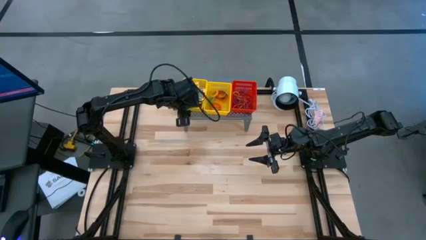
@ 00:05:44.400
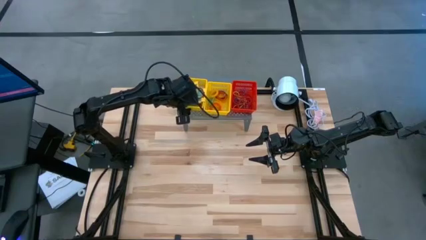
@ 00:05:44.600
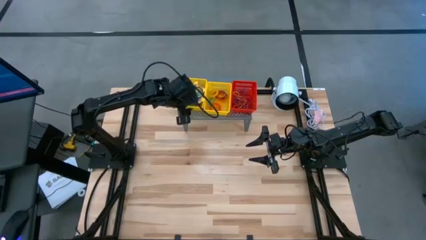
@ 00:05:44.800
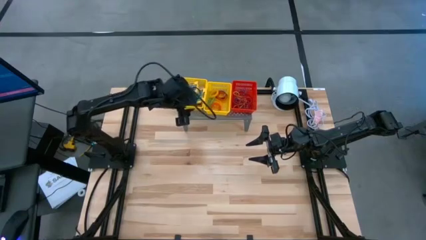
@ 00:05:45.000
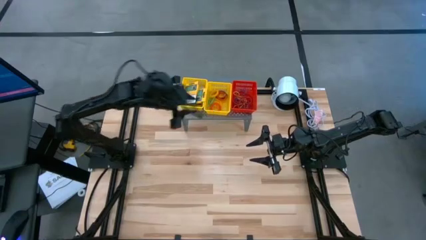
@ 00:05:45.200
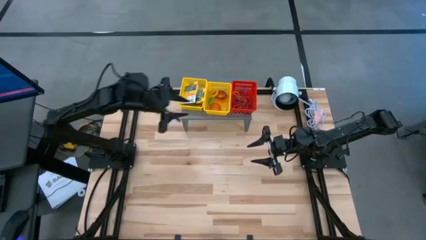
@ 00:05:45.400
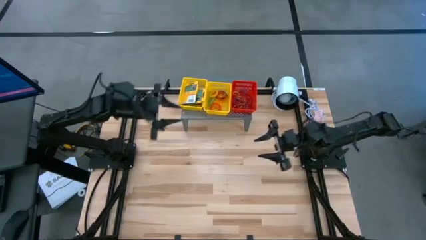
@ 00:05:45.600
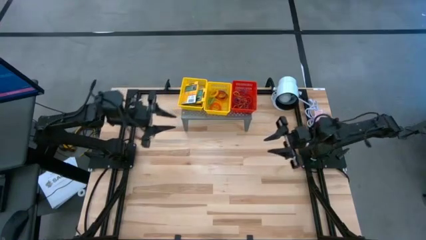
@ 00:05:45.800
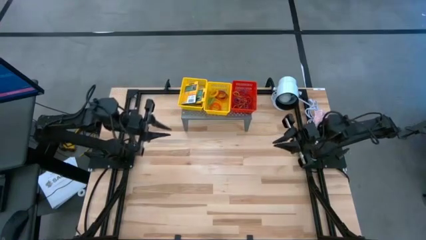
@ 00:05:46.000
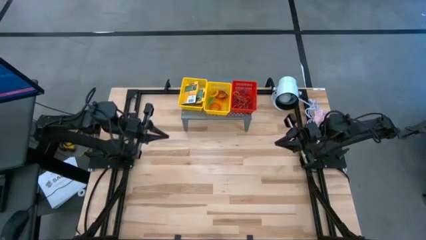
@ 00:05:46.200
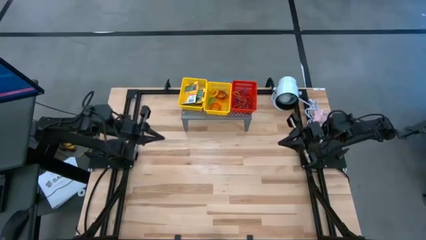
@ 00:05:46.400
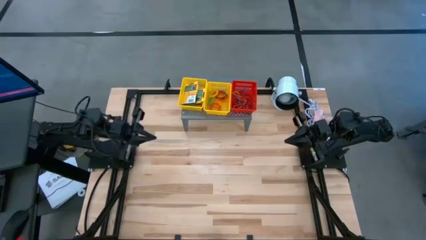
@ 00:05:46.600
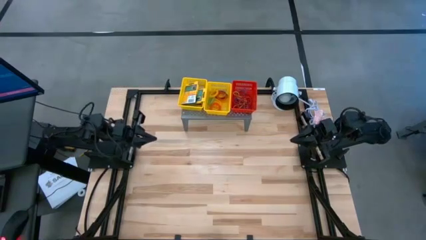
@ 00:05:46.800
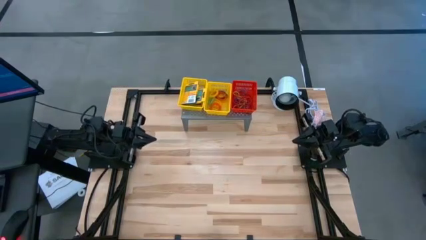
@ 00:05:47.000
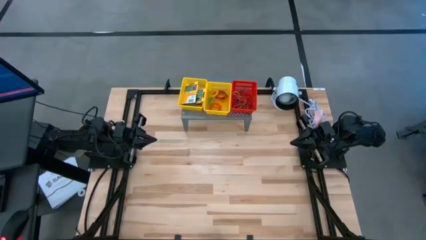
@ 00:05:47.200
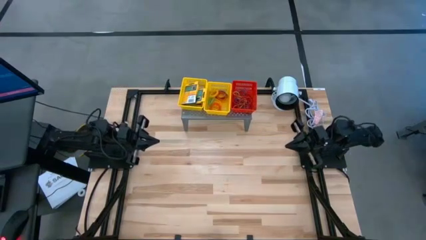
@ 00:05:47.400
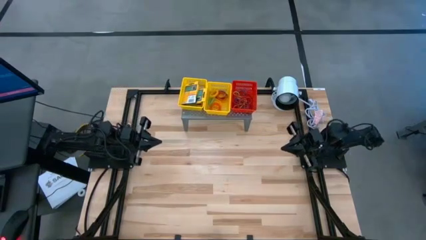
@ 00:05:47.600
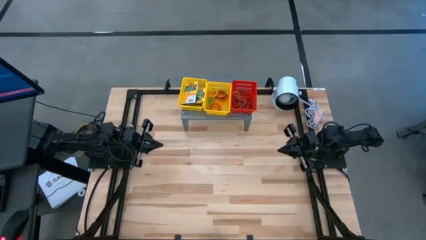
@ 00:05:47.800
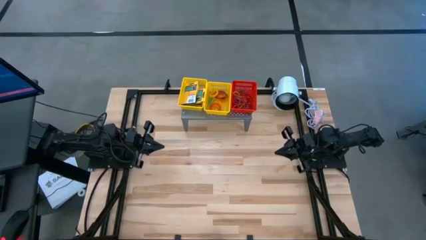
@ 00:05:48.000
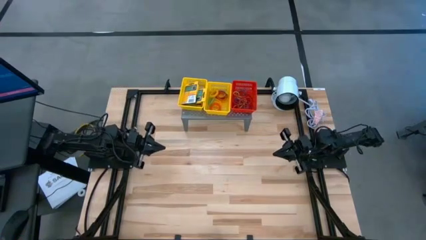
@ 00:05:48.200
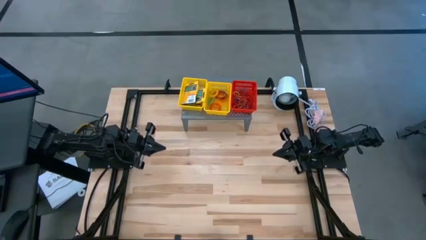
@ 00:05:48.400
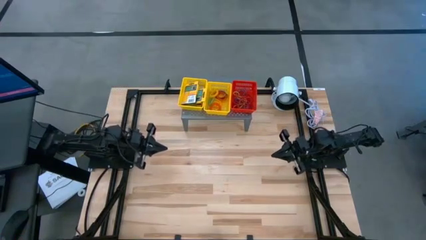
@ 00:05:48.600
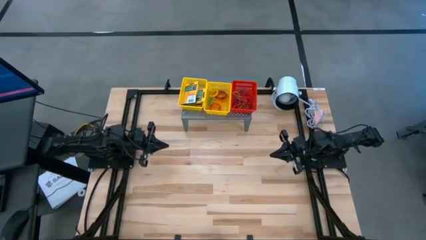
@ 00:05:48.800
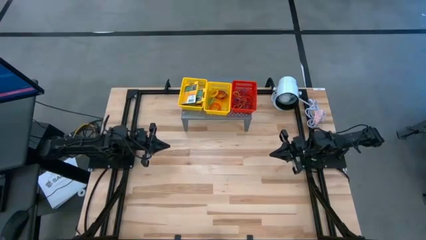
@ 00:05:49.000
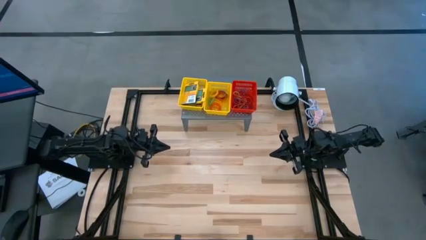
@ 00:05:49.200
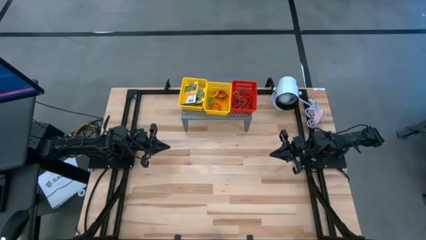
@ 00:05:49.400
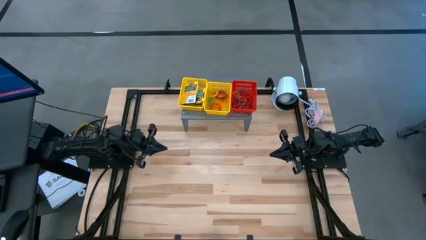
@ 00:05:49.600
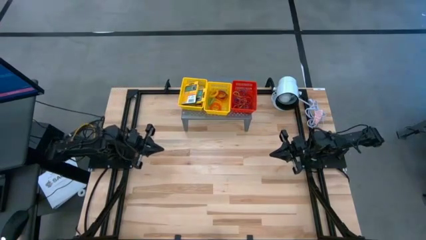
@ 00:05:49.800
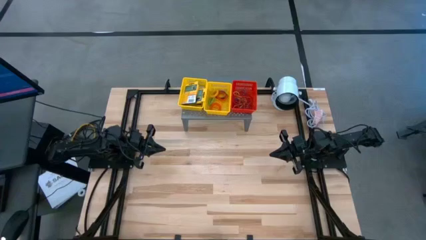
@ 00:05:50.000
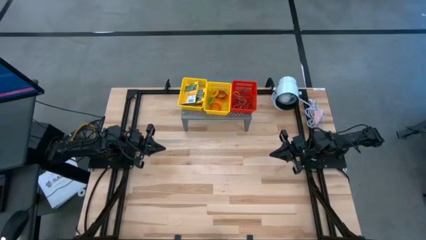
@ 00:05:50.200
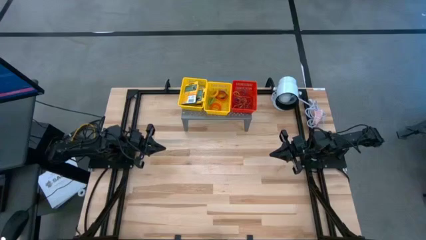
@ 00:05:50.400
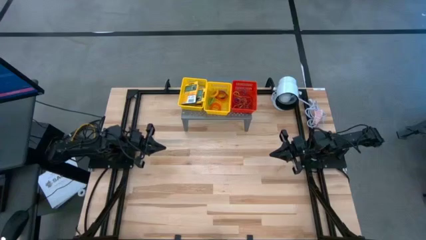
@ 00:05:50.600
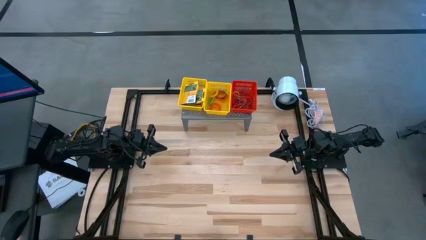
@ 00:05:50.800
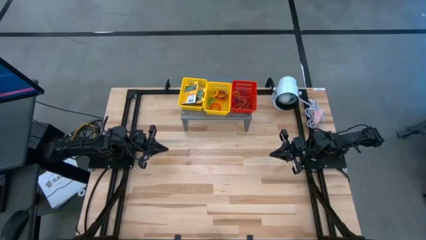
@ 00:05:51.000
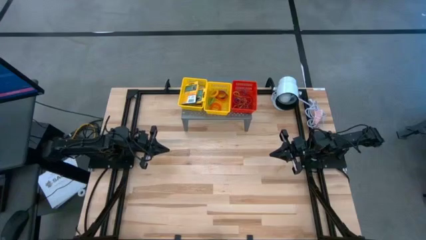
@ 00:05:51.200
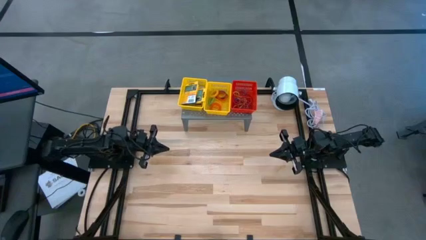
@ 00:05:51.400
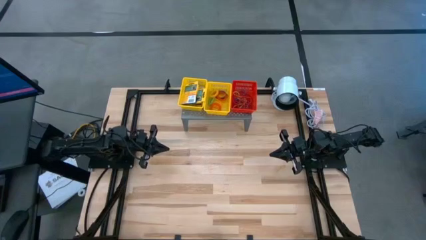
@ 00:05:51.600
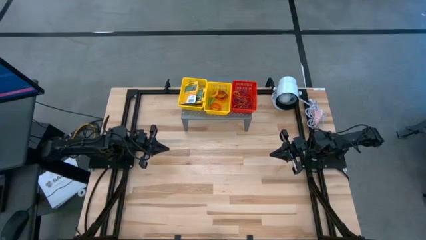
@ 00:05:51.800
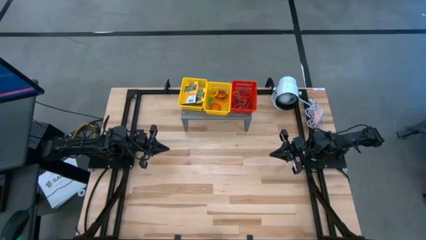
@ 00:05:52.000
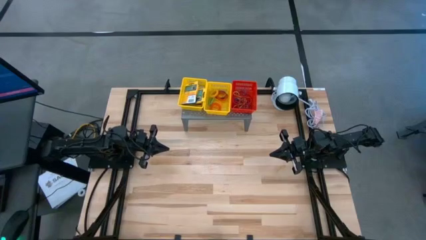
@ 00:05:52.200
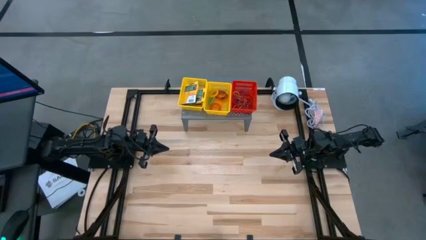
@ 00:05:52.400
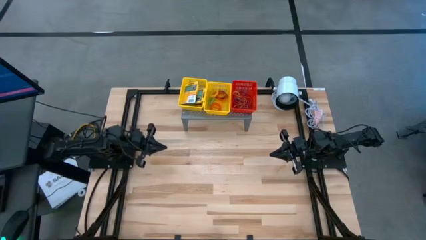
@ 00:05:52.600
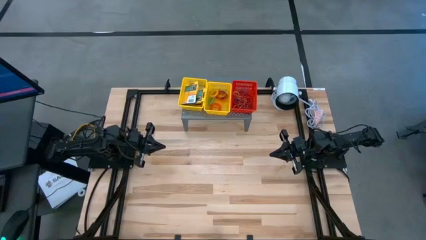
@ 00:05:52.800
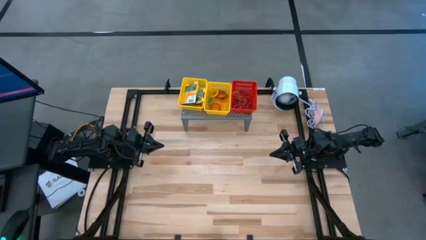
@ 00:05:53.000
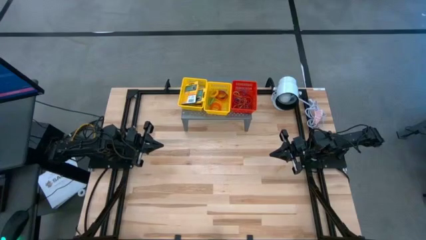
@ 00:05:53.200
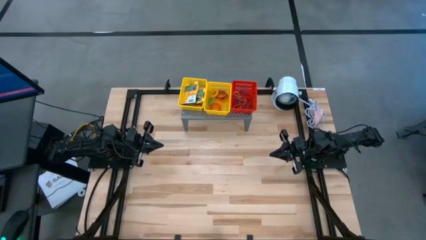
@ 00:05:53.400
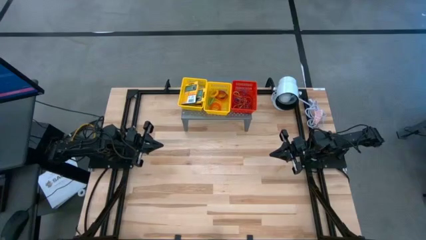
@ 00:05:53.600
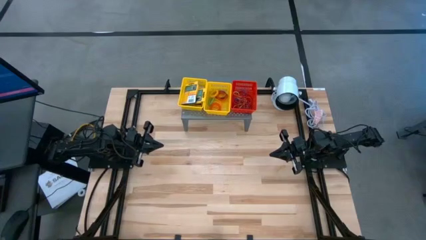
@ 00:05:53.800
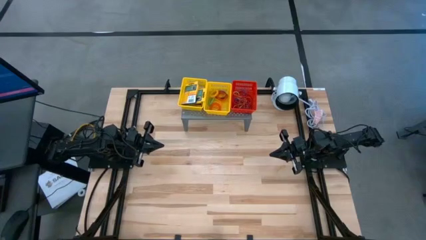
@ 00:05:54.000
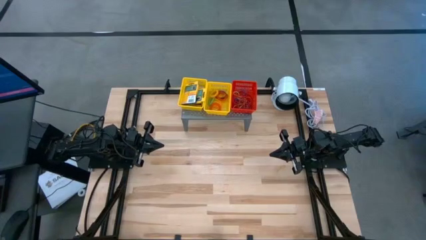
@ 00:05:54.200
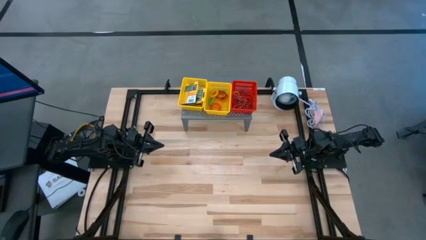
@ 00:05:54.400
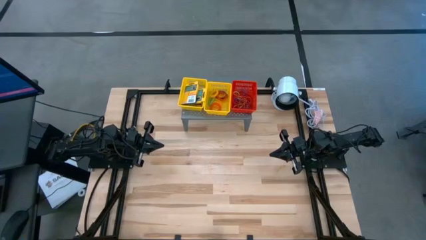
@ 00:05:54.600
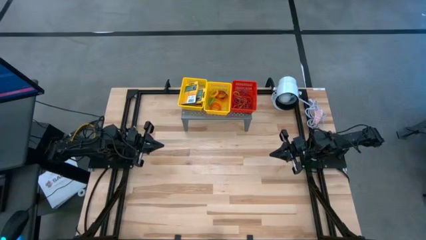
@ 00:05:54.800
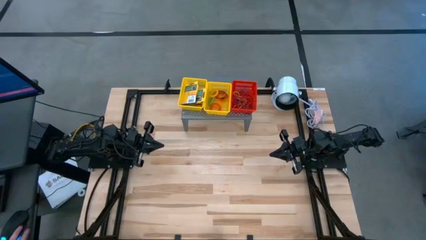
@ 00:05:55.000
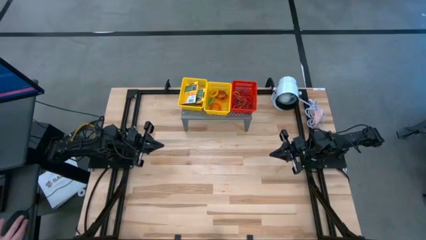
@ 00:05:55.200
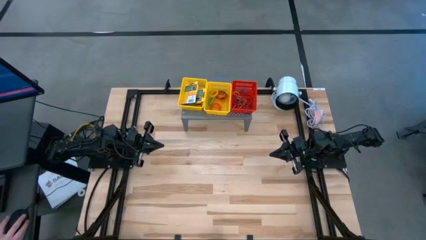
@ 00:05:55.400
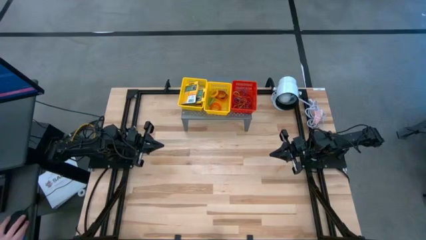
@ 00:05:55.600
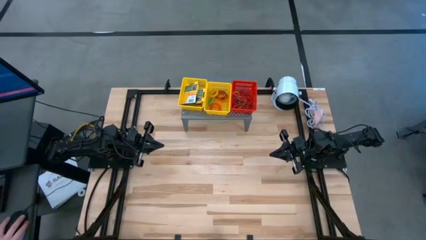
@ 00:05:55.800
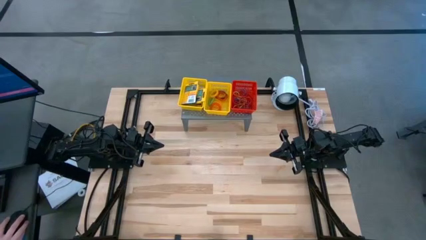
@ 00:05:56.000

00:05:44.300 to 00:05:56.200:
Task: Pick & Place Office Desk Supplies
Return to Home Position
